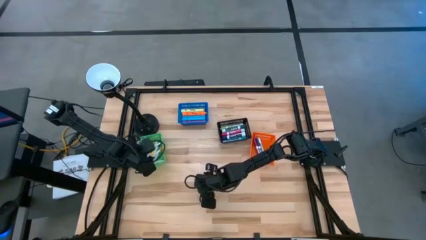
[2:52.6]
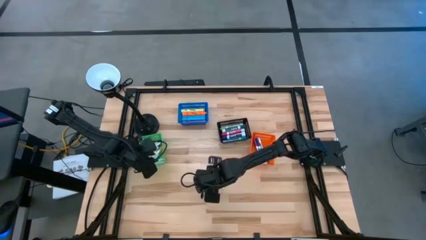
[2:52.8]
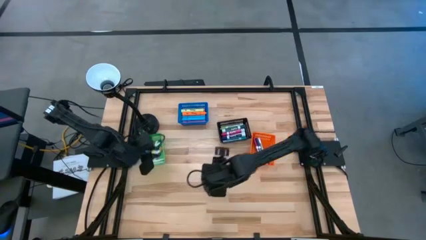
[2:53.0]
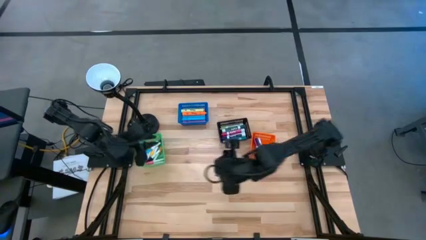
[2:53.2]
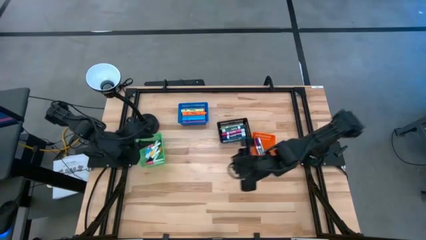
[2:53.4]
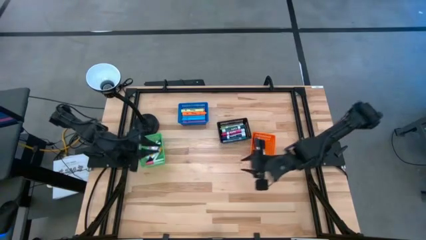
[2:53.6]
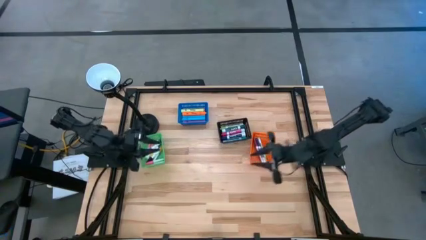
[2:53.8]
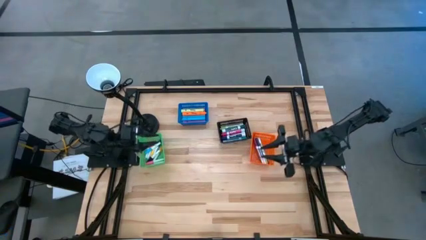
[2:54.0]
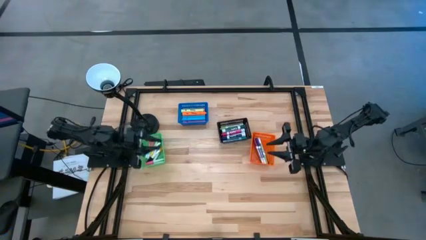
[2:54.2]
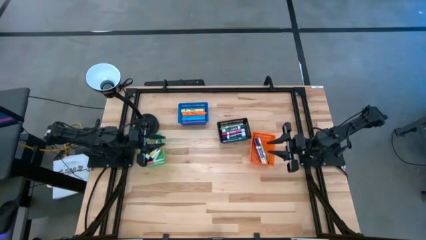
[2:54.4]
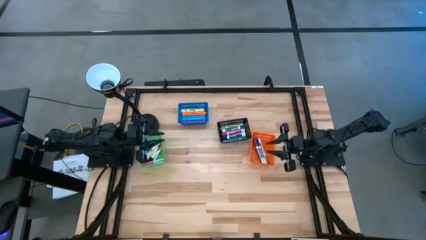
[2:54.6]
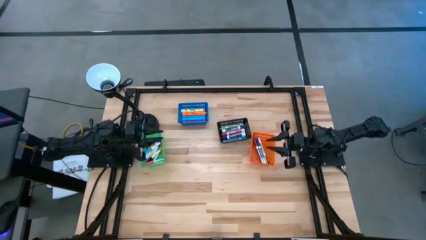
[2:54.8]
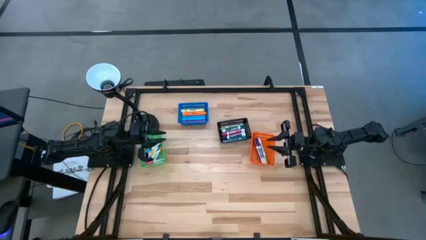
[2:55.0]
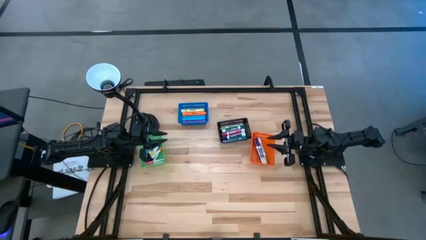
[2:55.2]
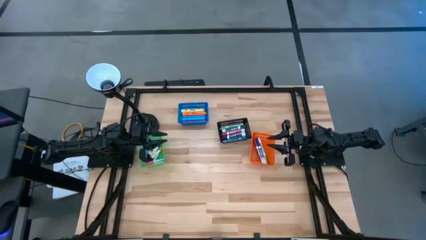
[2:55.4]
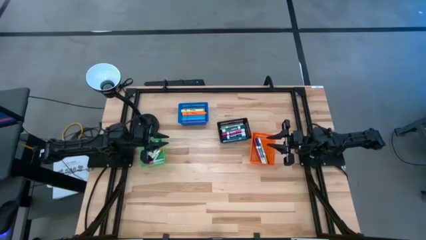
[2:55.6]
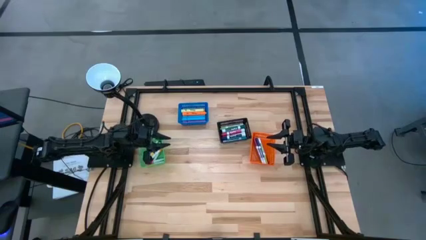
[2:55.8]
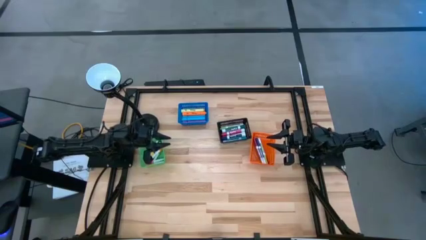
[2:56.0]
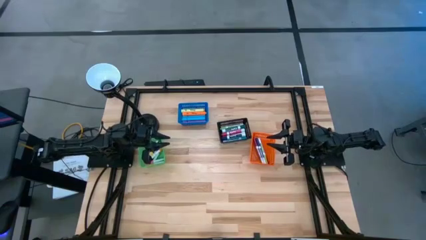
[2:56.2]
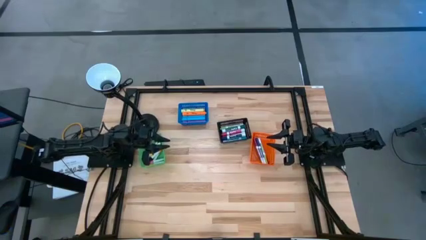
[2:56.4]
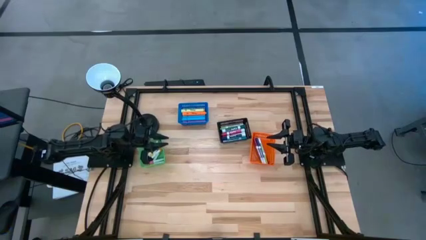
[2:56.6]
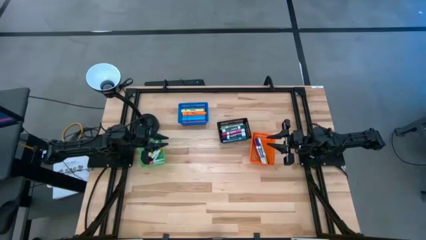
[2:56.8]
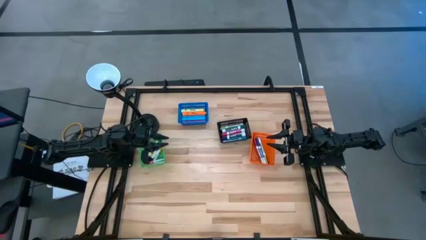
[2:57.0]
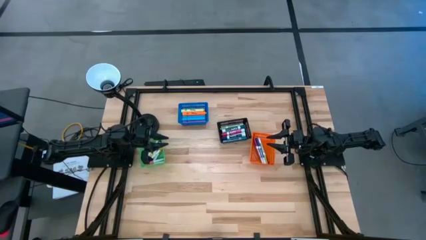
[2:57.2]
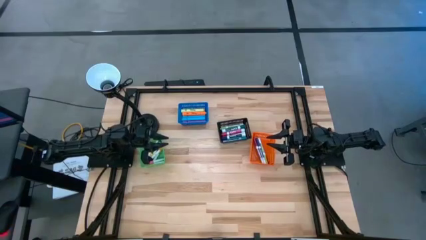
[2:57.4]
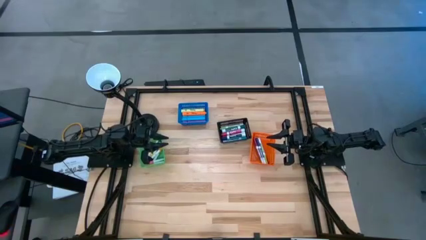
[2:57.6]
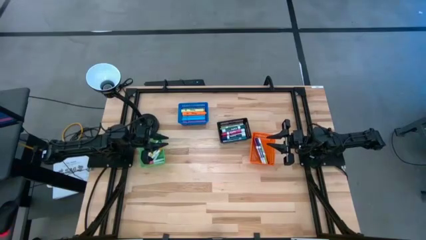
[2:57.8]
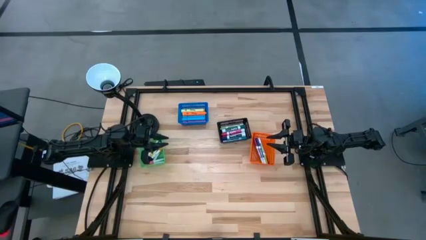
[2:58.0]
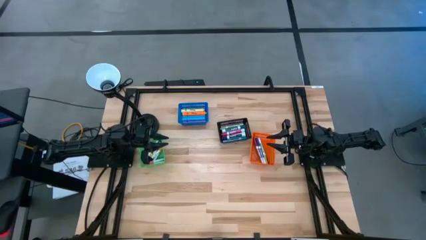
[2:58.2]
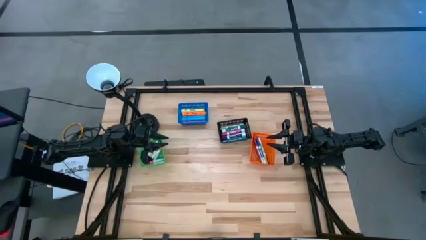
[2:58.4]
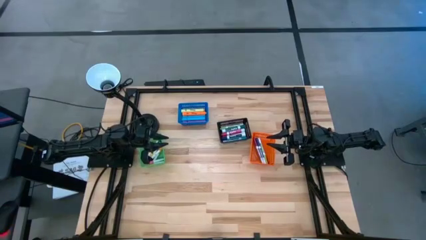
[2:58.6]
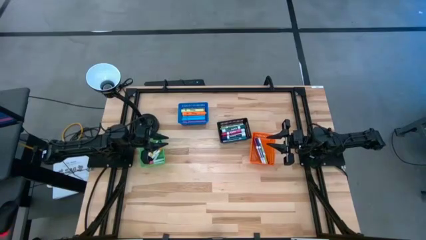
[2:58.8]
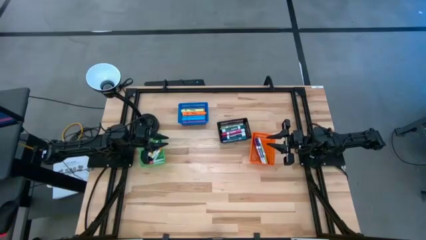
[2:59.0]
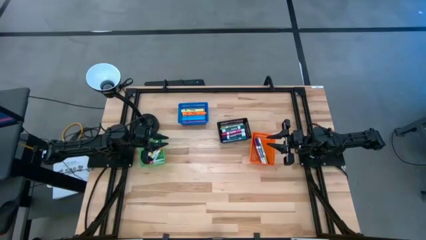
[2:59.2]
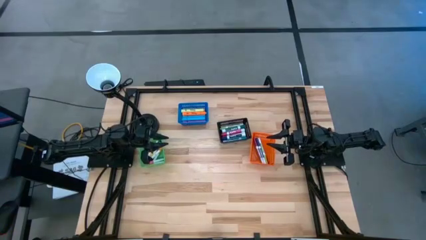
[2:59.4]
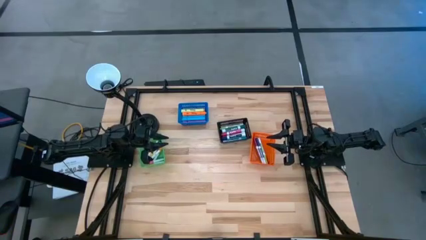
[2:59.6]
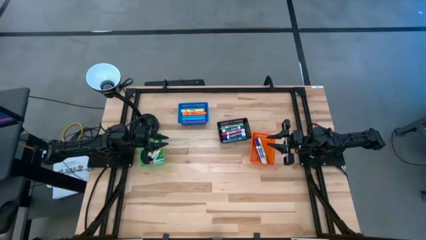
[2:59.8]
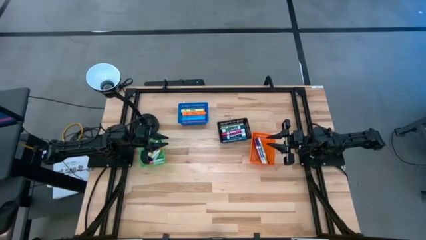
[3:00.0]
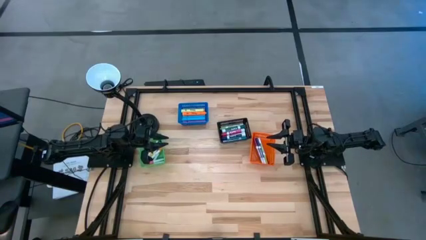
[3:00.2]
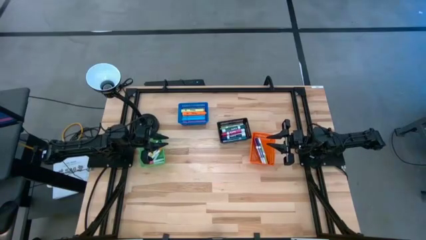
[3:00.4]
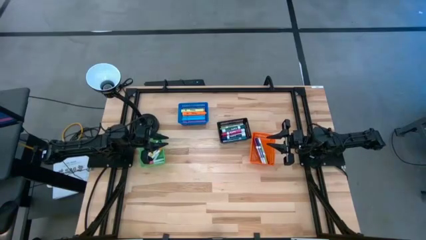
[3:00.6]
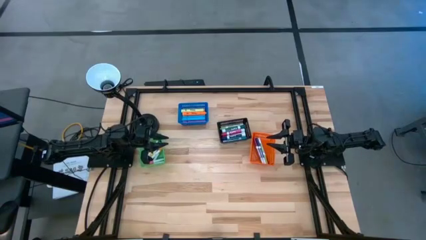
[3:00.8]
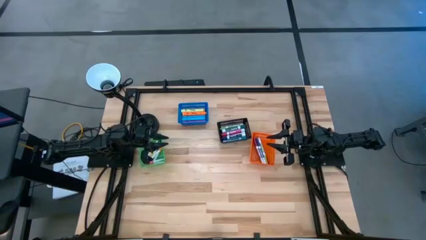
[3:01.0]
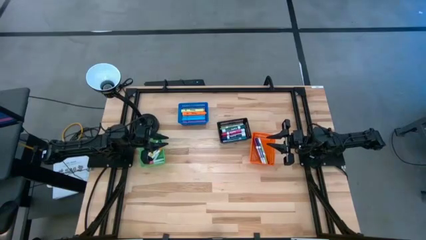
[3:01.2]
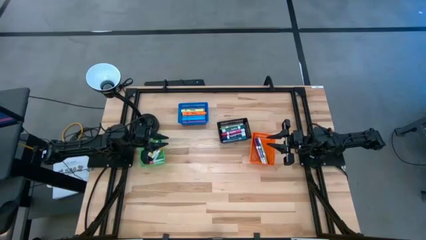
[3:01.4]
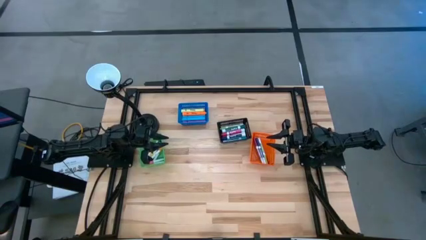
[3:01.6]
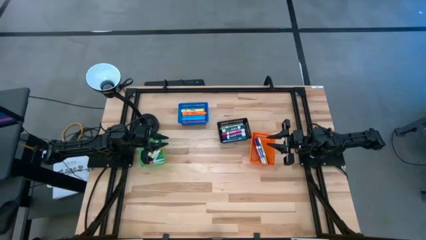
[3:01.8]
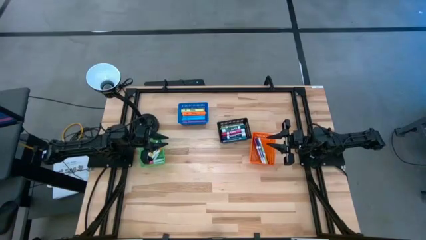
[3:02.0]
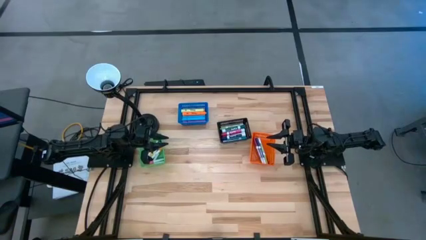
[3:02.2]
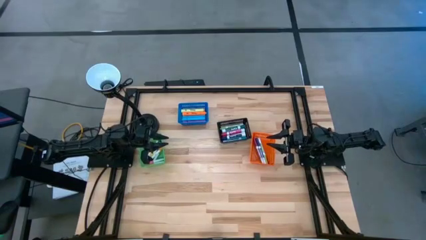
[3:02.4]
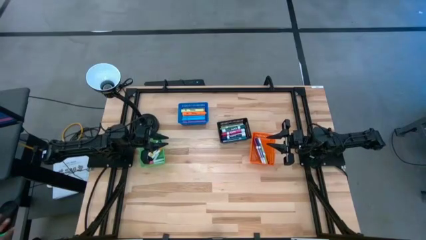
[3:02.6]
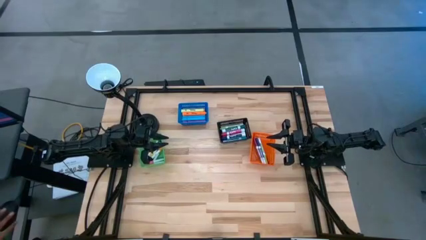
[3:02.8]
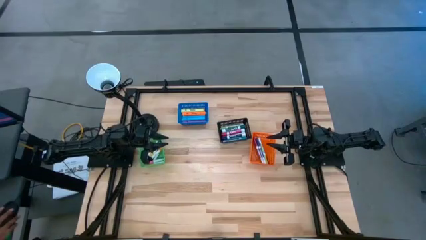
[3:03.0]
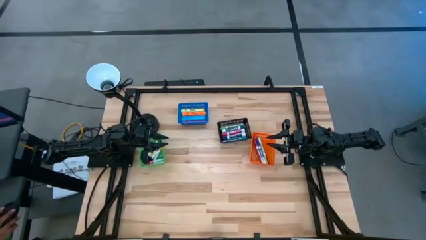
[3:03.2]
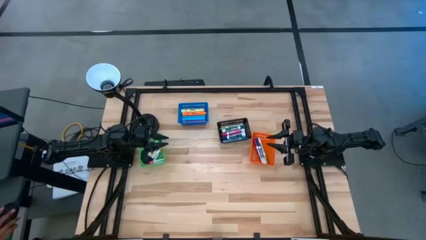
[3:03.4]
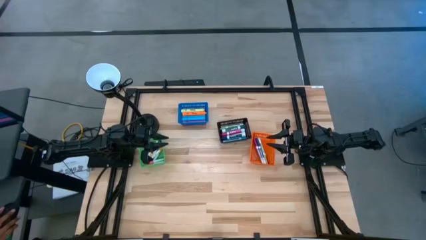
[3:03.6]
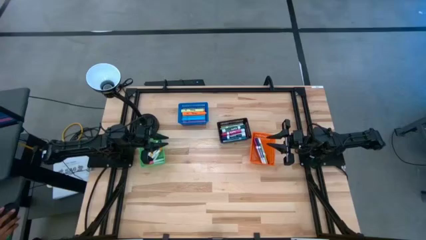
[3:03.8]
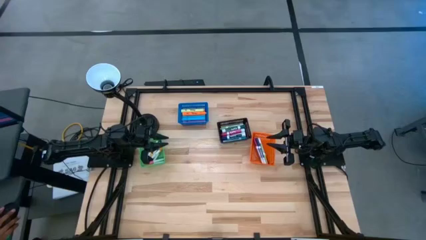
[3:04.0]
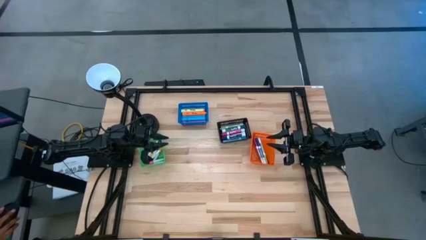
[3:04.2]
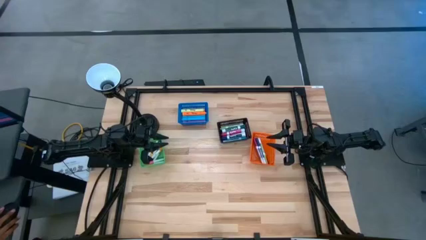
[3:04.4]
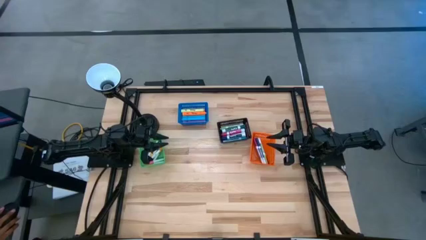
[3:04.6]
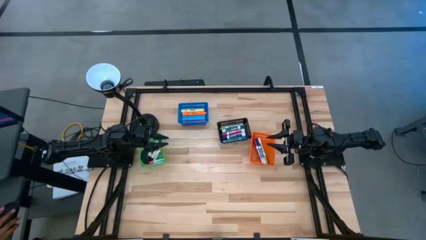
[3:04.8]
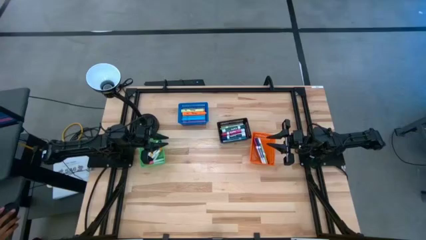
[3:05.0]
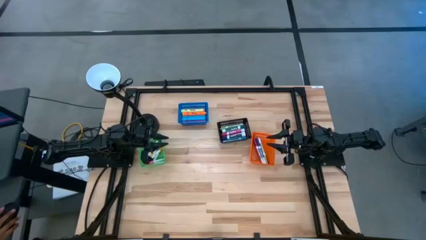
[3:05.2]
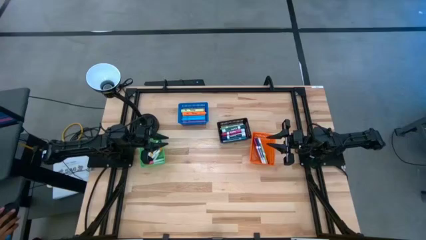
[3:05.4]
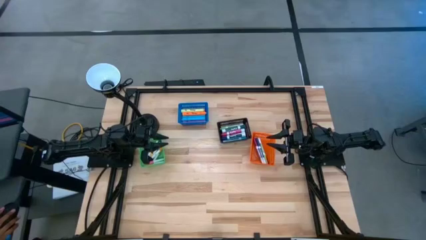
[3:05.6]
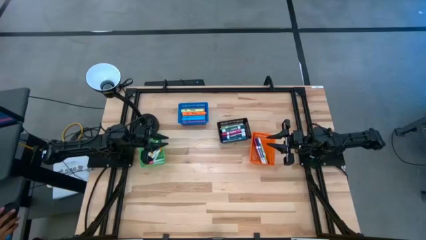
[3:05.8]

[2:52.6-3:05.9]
Task: Pick & Place Markers
Return to home position

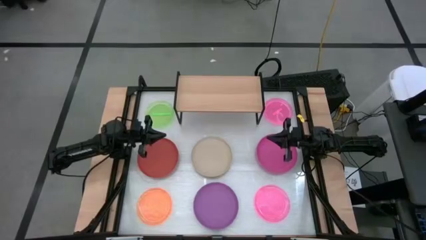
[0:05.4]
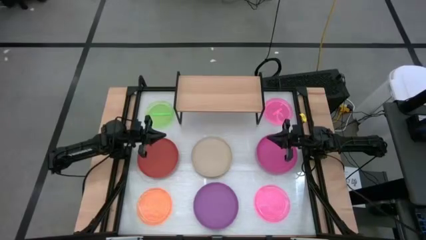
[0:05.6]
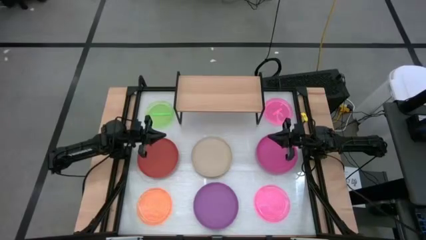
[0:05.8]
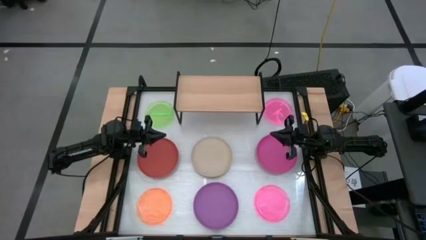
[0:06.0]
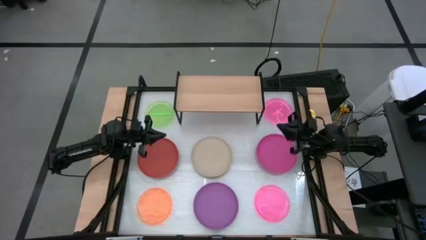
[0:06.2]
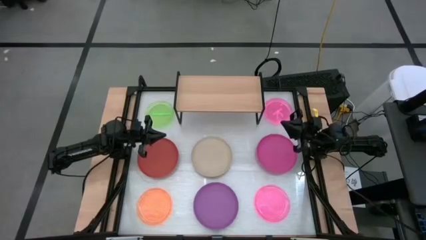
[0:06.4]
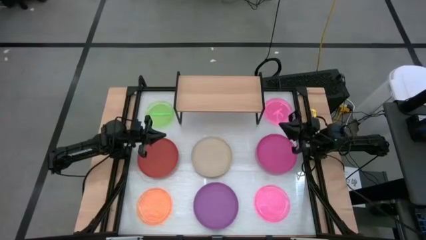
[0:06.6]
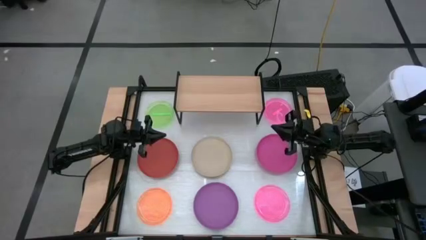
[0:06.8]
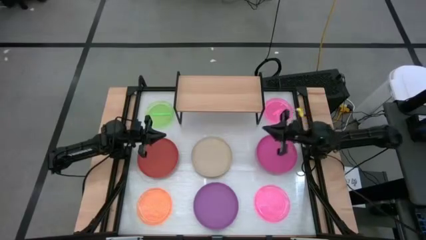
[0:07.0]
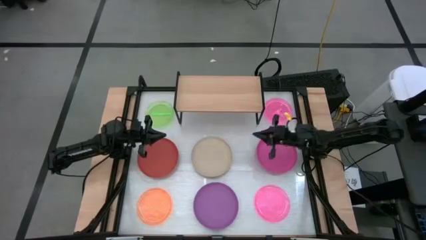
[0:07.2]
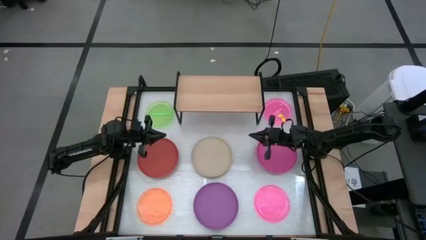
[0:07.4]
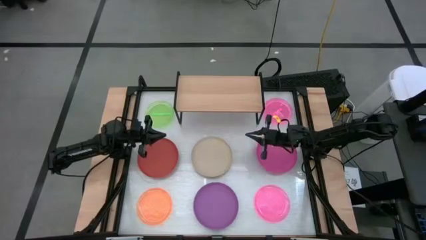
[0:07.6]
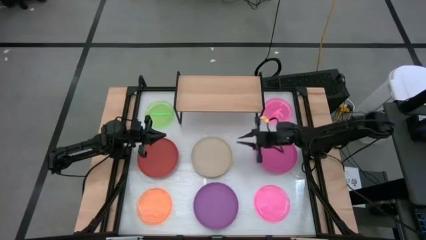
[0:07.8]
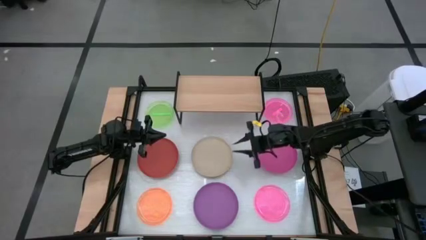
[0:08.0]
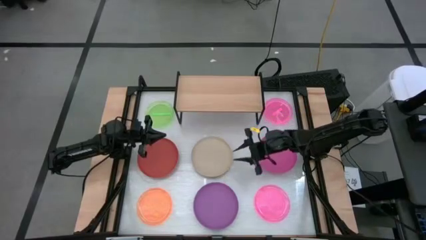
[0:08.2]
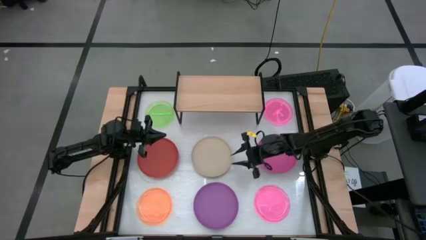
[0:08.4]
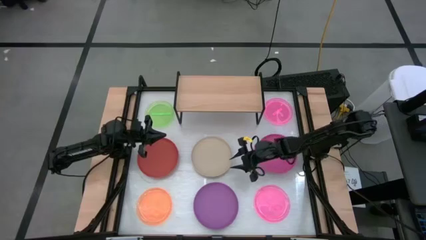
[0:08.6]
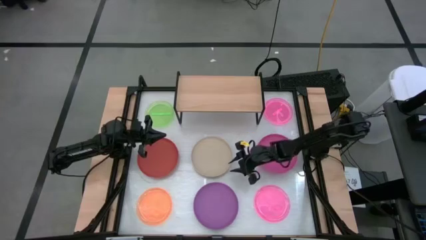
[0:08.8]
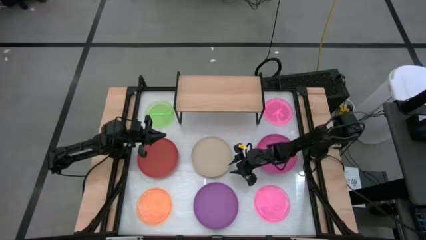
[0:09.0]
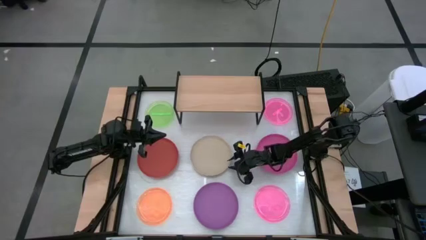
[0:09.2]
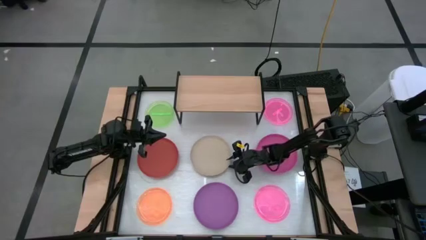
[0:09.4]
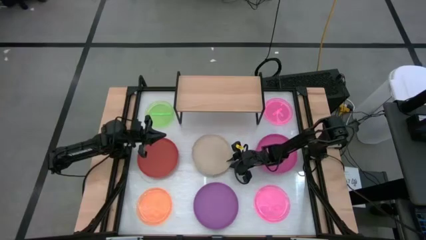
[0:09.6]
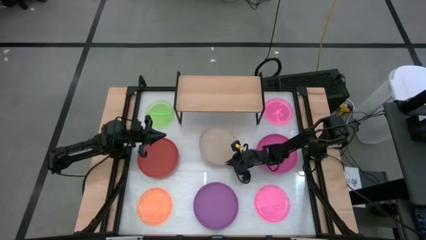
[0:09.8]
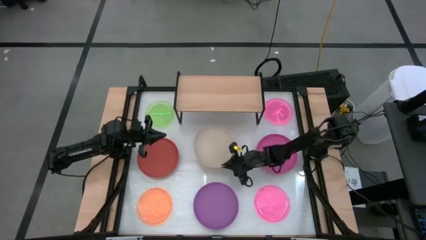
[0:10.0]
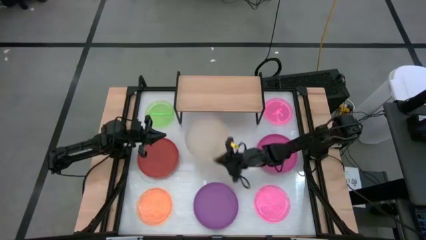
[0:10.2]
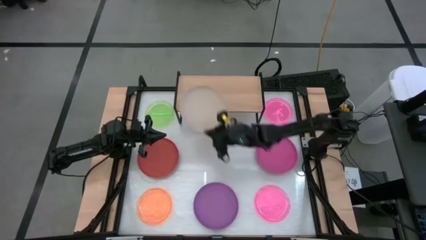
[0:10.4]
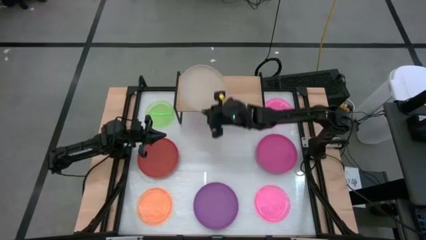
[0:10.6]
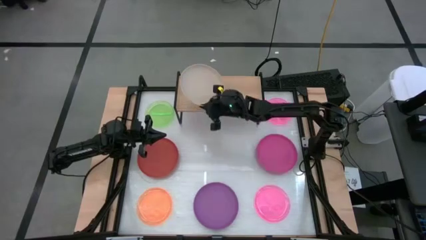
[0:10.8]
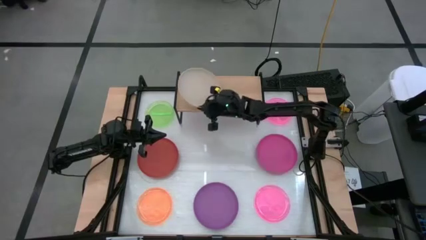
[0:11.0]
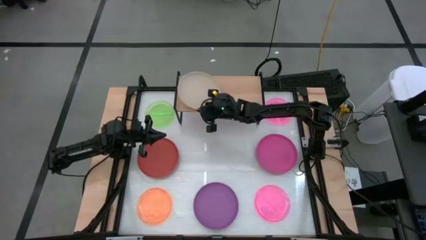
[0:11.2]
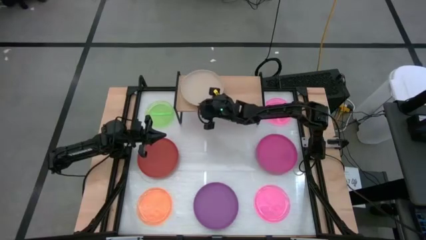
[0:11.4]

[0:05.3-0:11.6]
Task: Place and stack plates onto a shelf
Put the gray plate on the shelf
